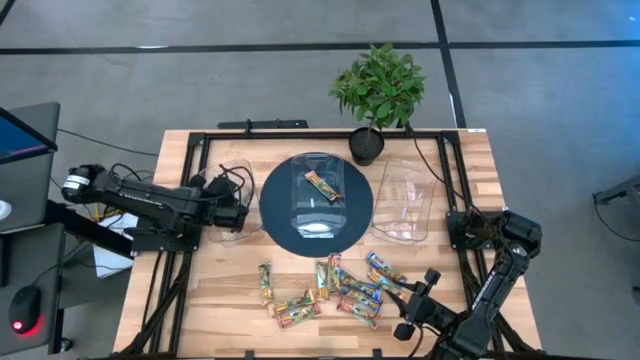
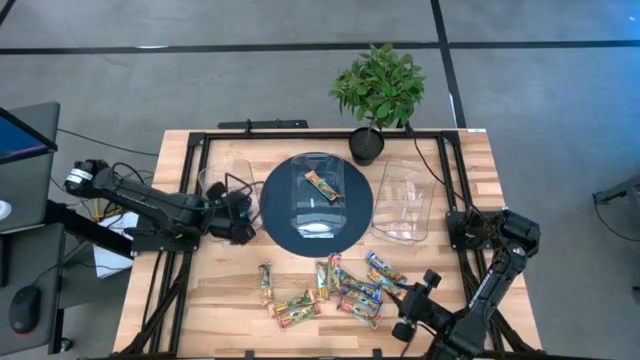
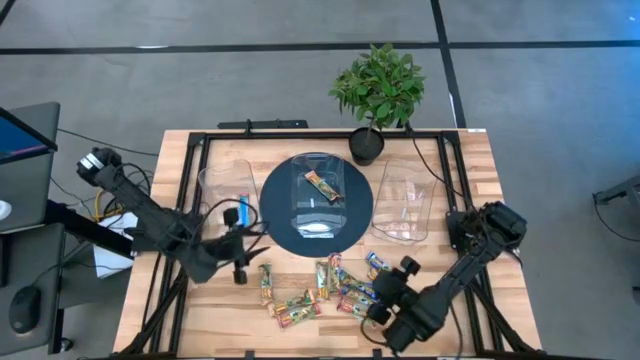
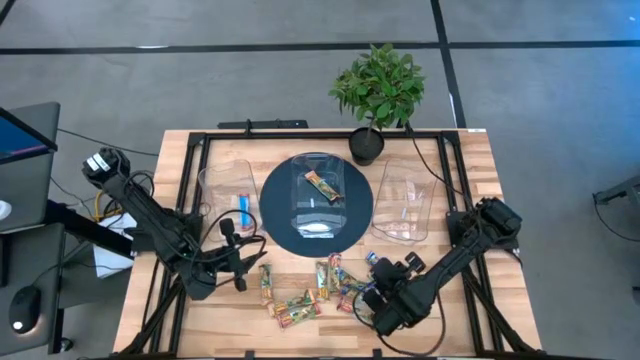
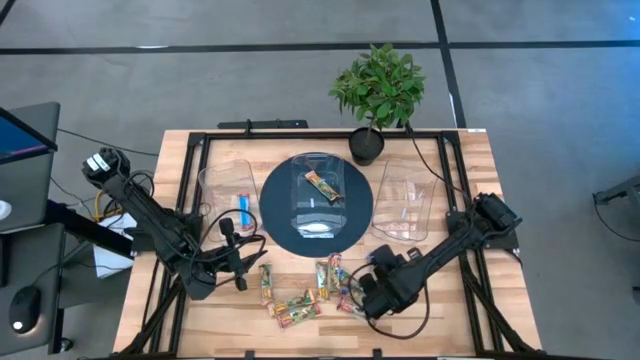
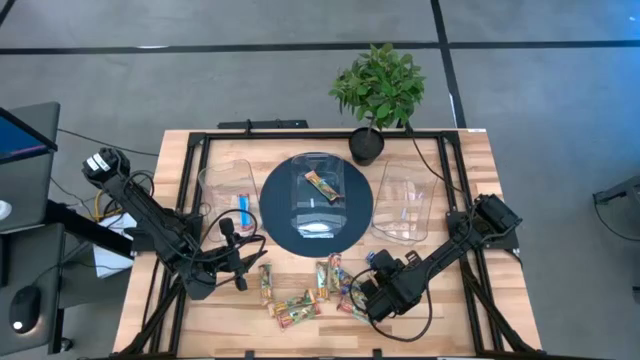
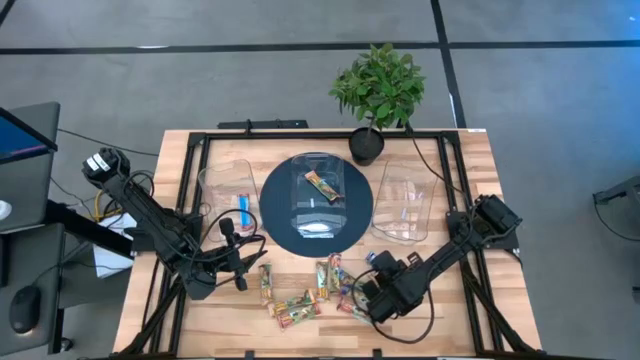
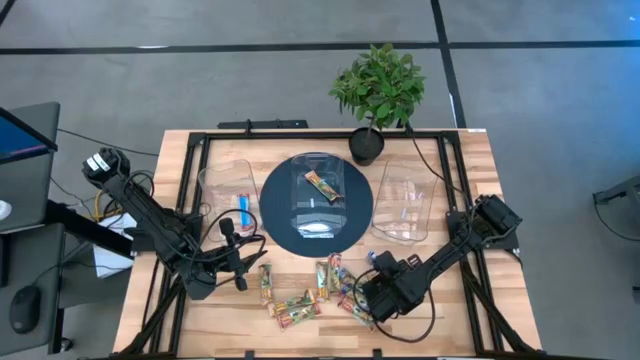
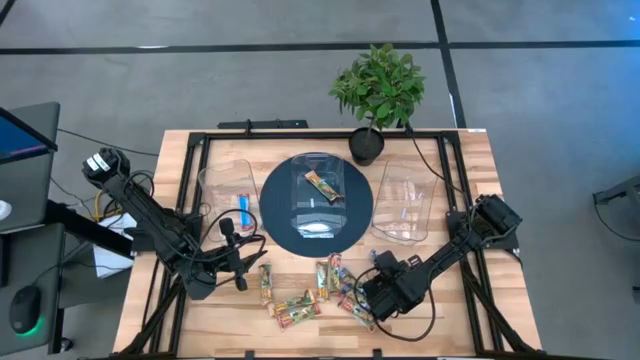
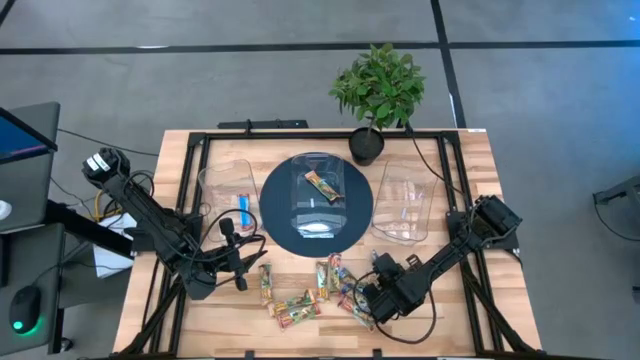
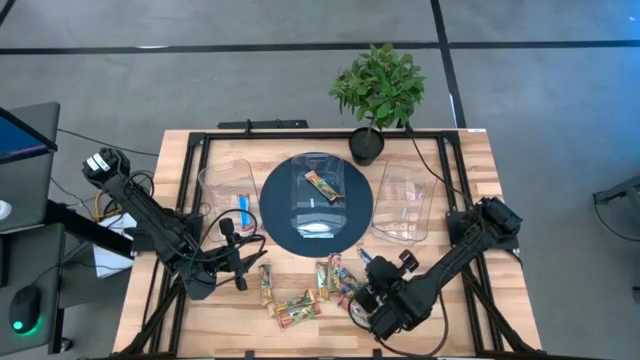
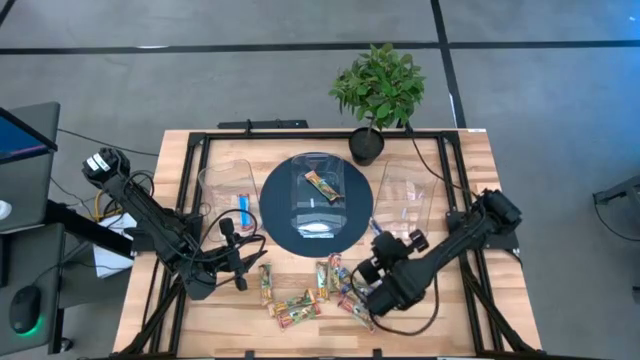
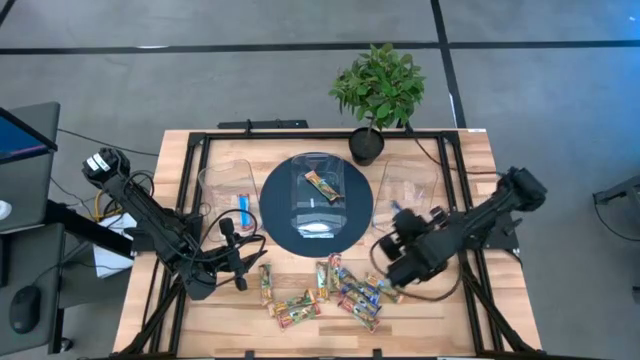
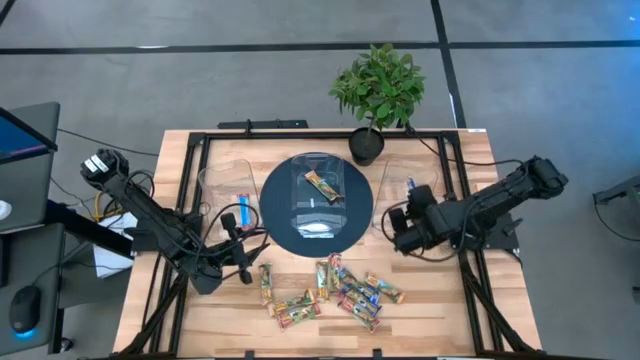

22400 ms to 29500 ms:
Task: Pick and place Granola Bars by type
Put the blue granola bar into the right transparent bin

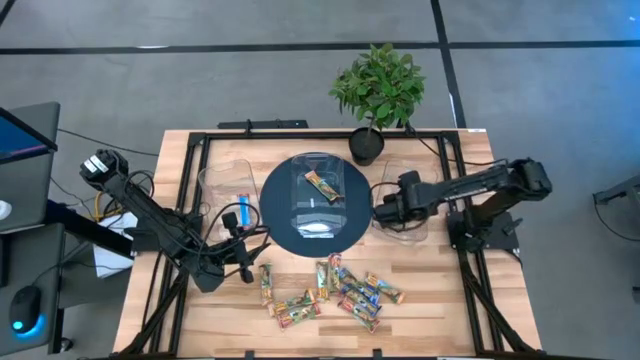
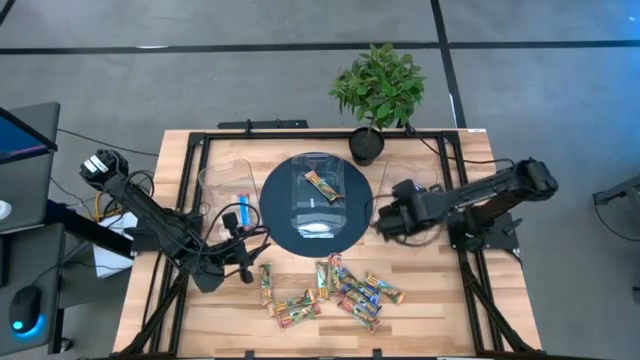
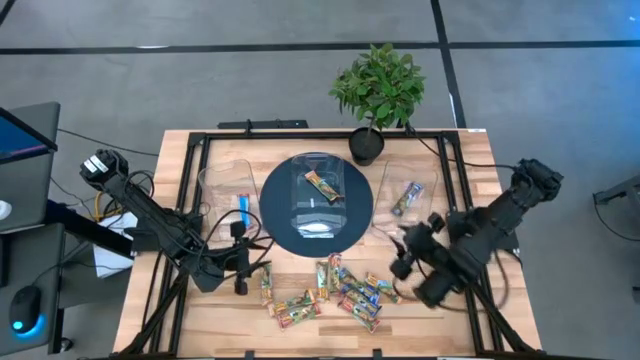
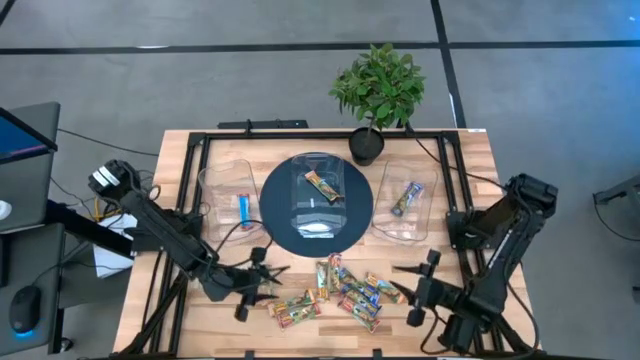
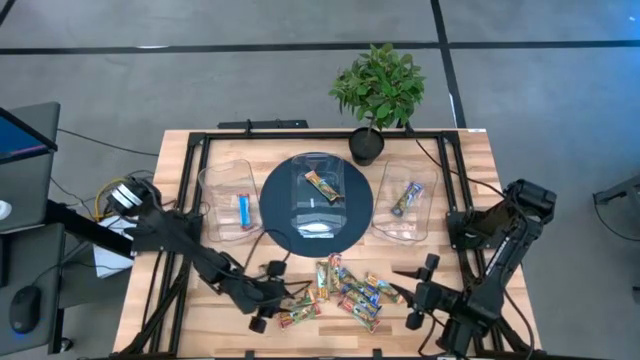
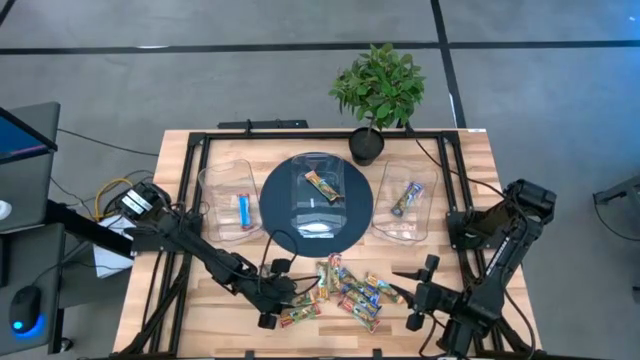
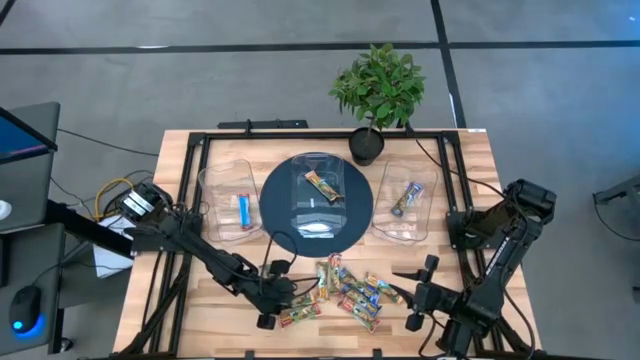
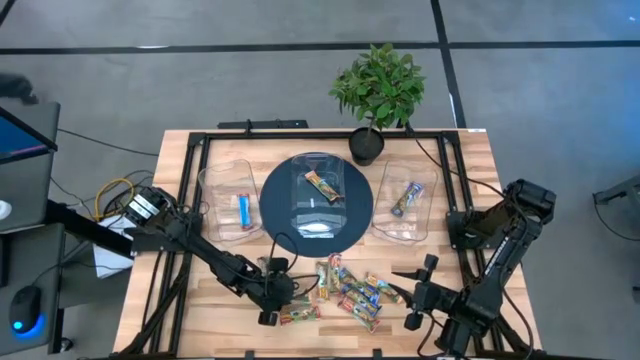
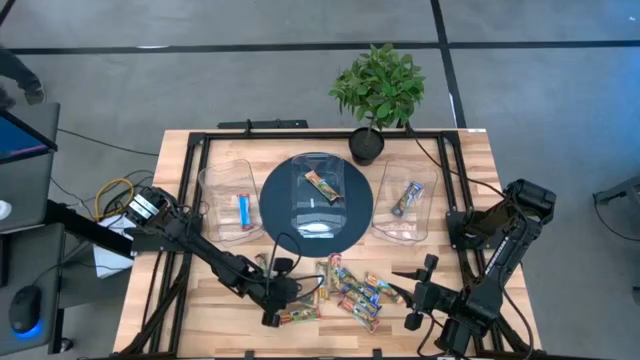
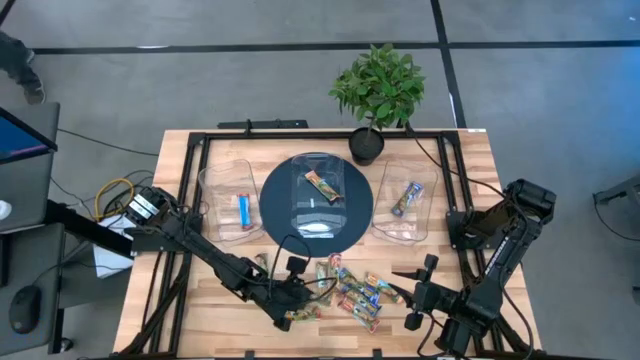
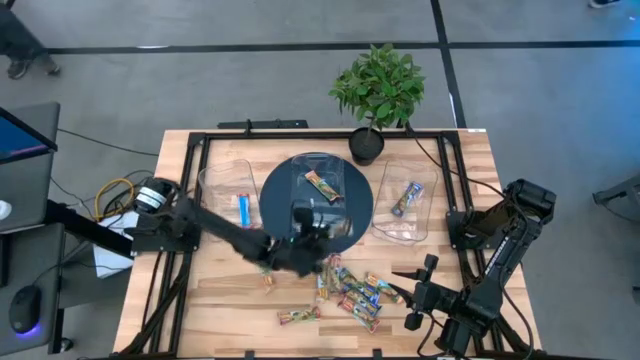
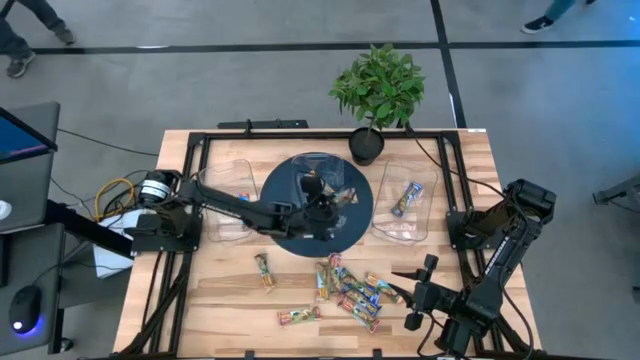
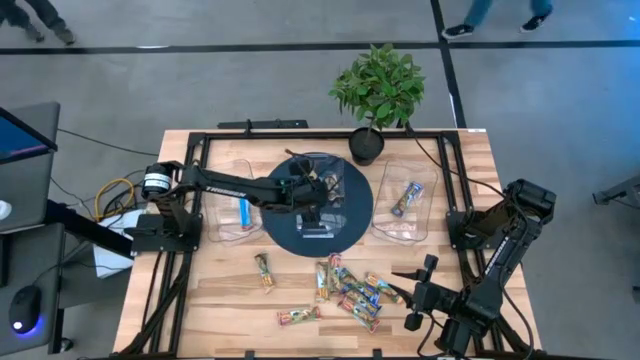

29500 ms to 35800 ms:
Put the yellow granola bar into the middle transparent bin

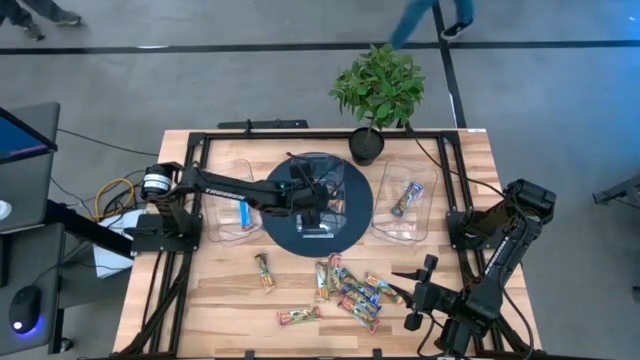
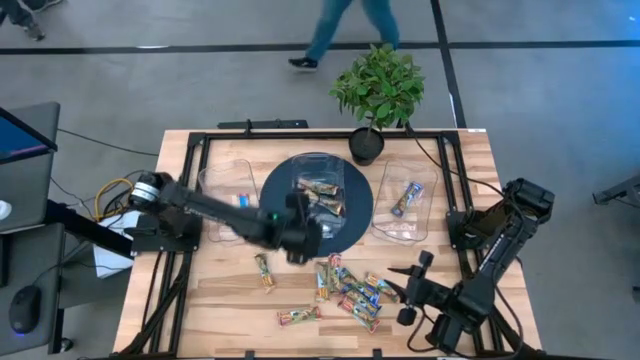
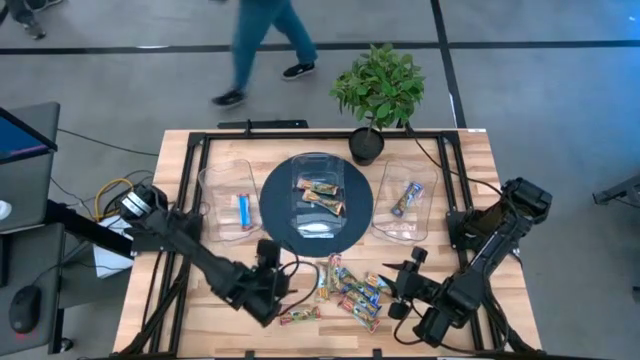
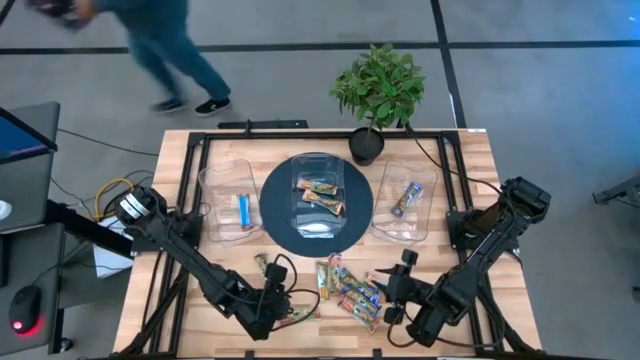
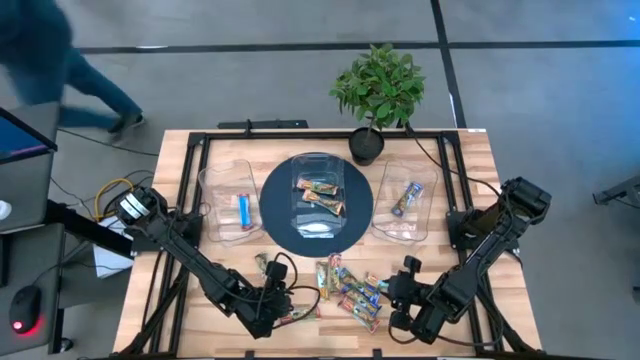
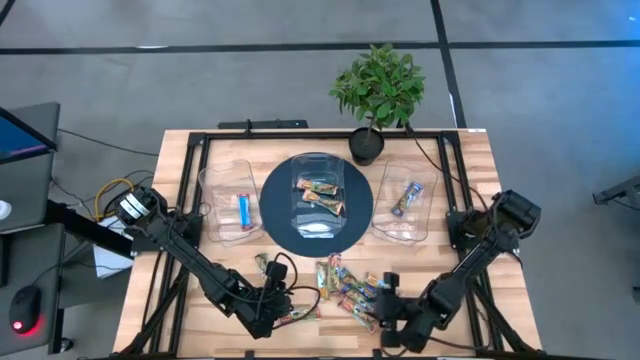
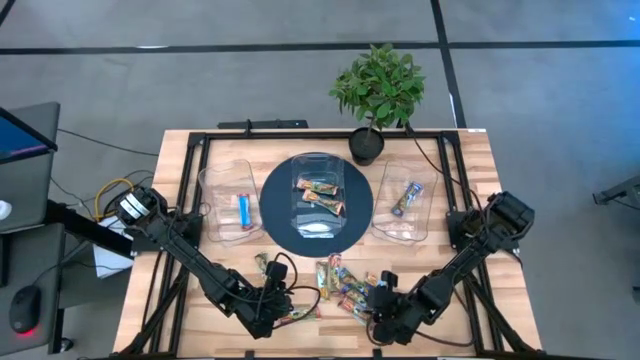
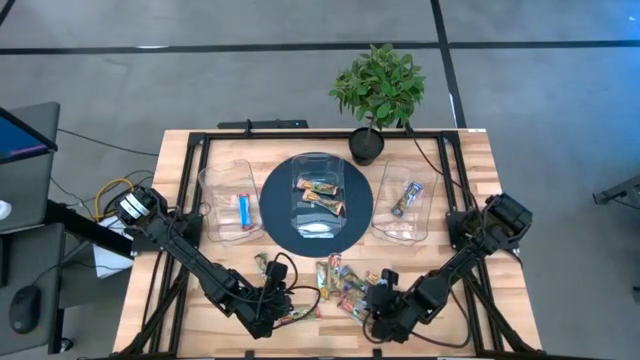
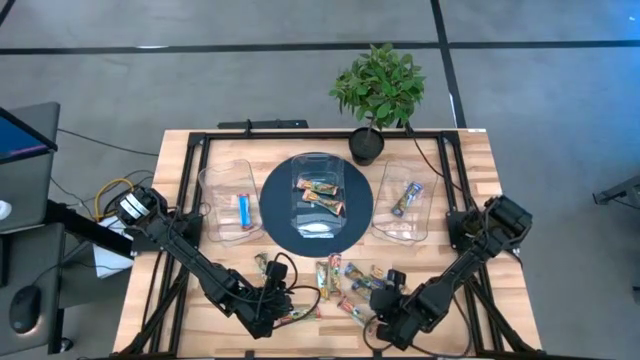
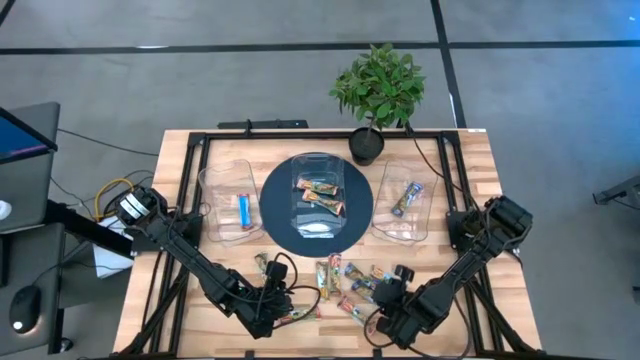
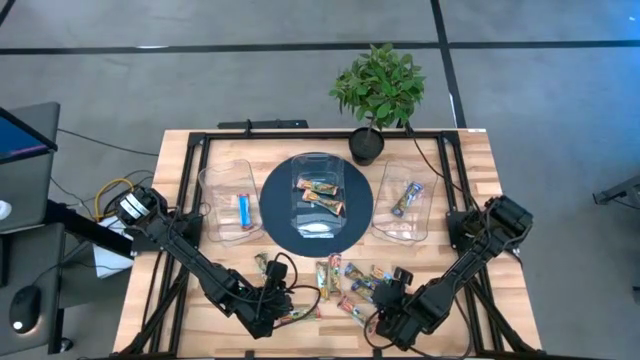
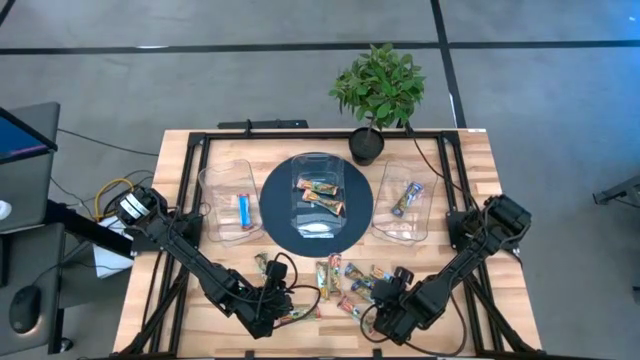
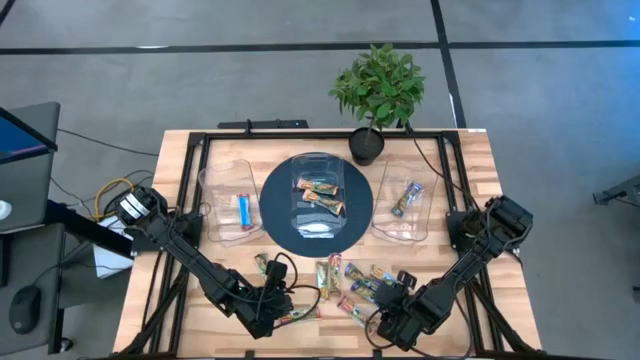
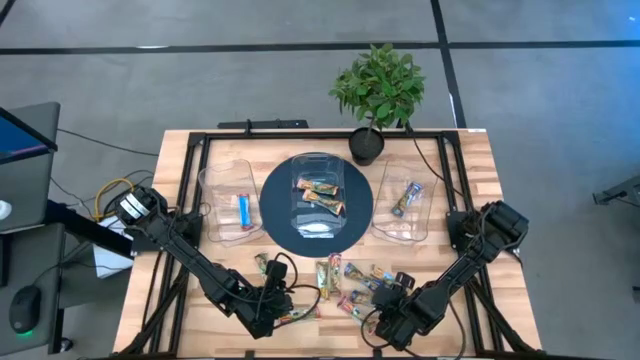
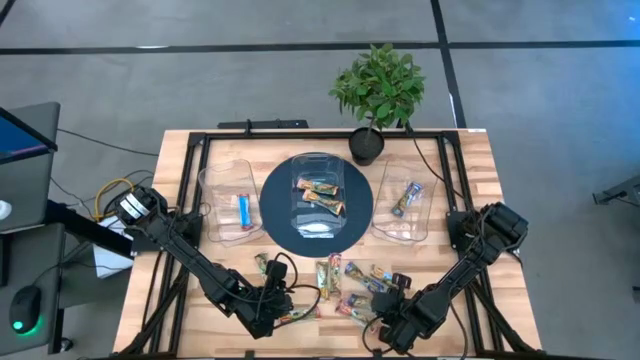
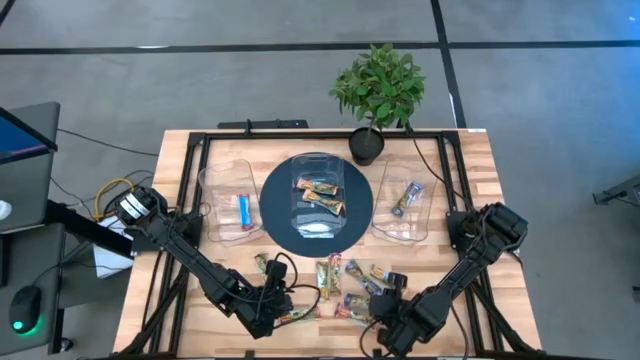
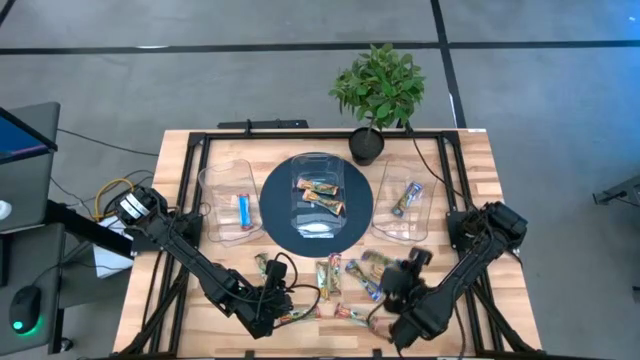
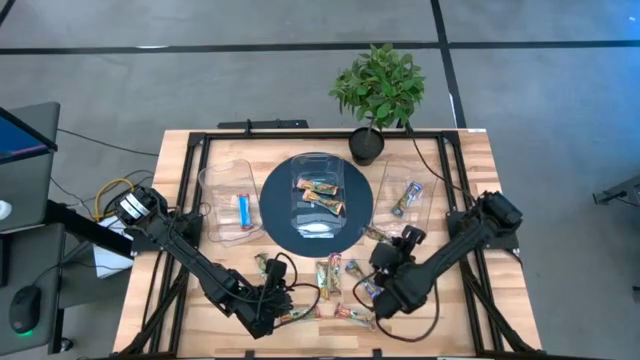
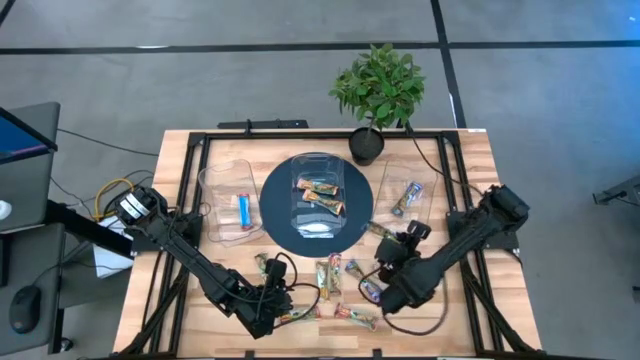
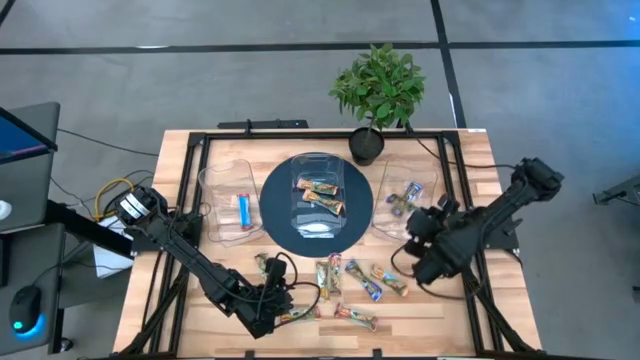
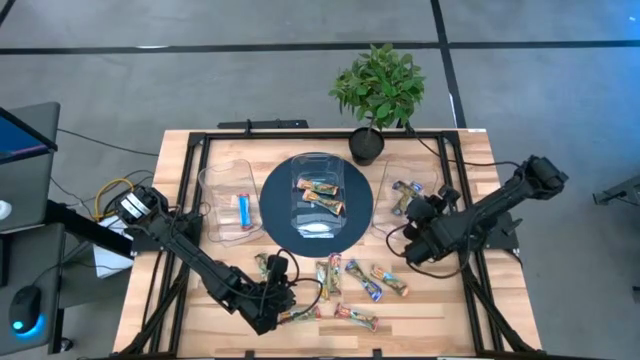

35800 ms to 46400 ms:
Put the blue granola bar into the right transparent bin
